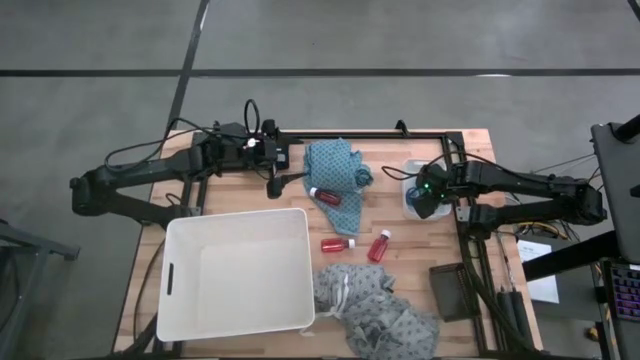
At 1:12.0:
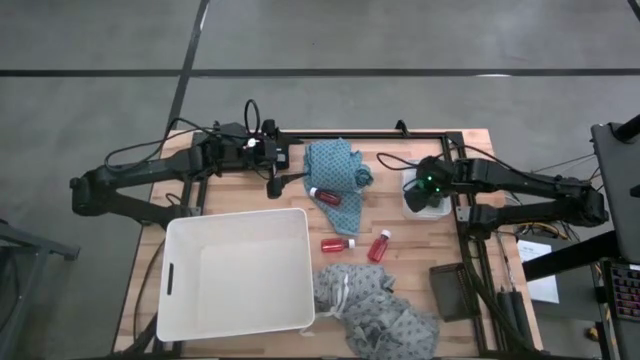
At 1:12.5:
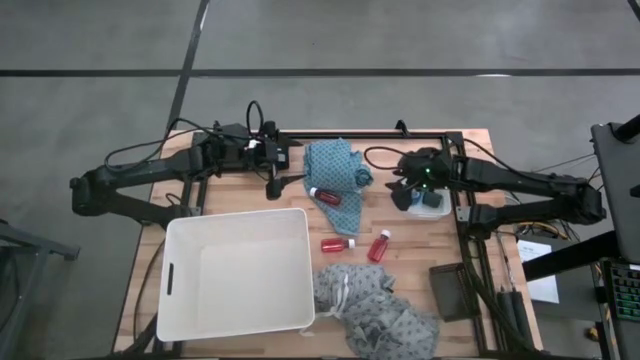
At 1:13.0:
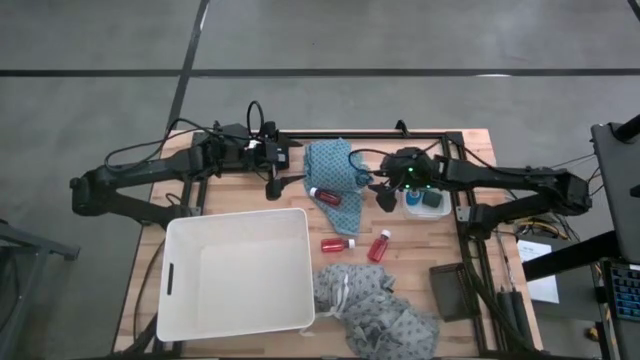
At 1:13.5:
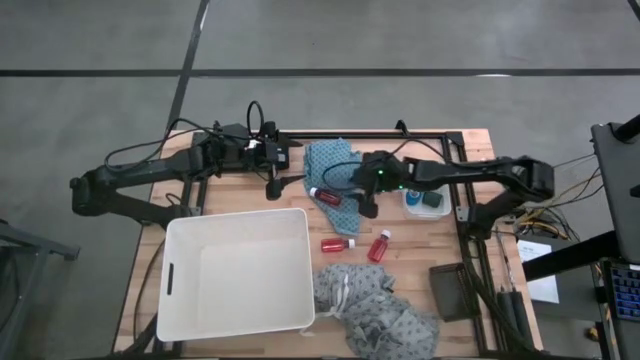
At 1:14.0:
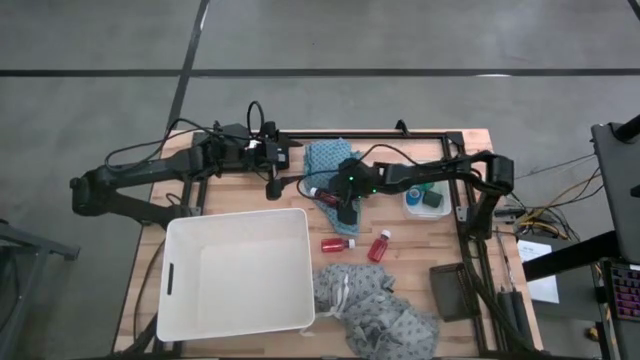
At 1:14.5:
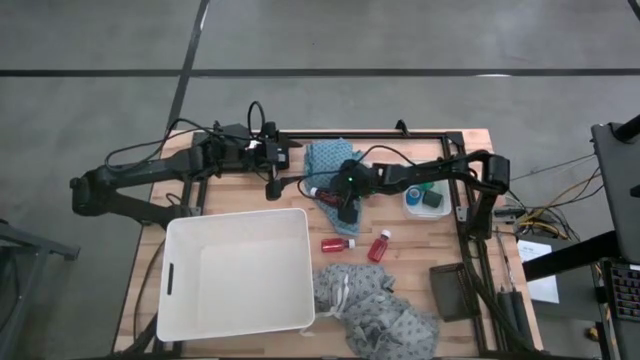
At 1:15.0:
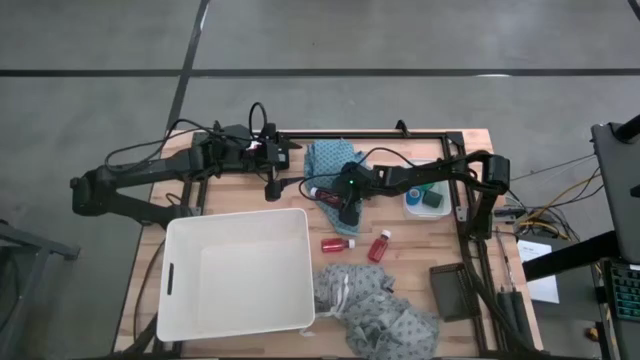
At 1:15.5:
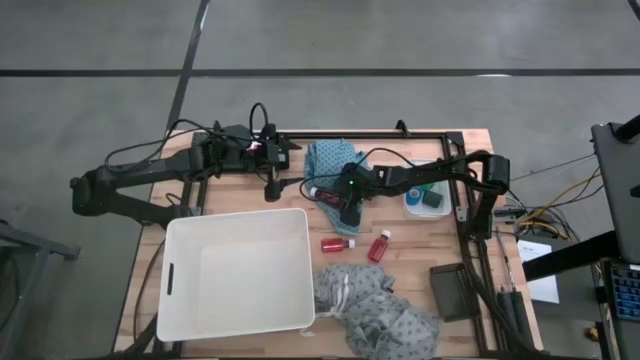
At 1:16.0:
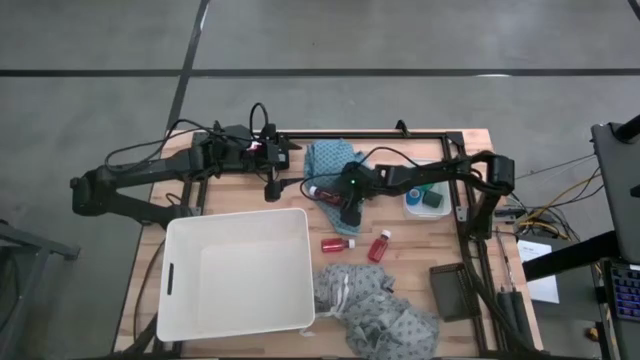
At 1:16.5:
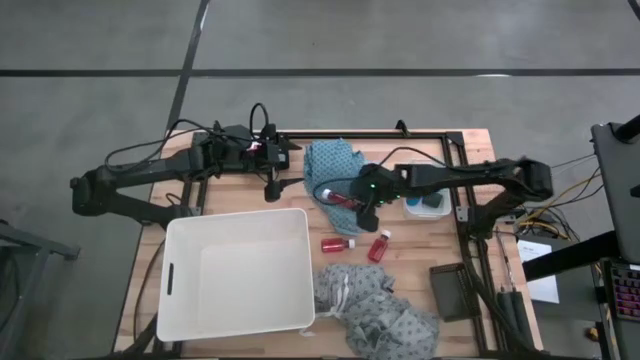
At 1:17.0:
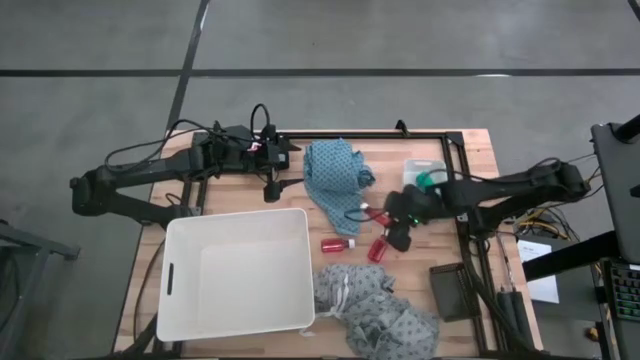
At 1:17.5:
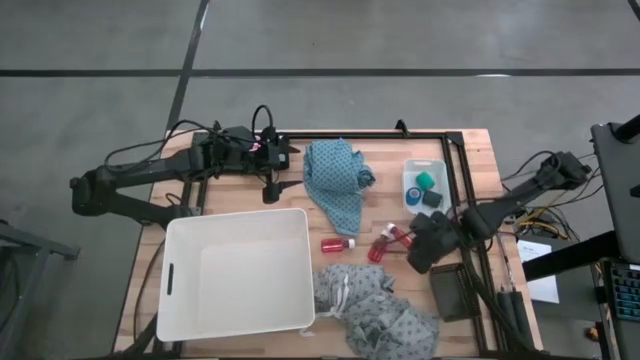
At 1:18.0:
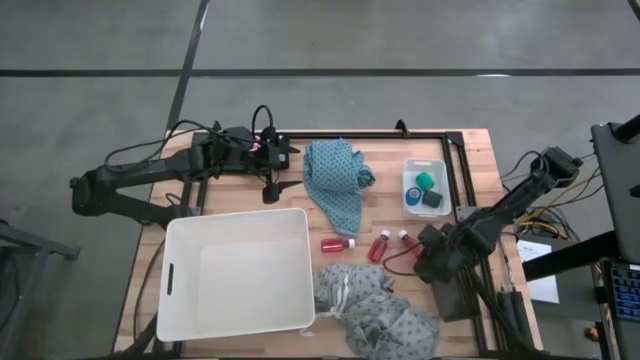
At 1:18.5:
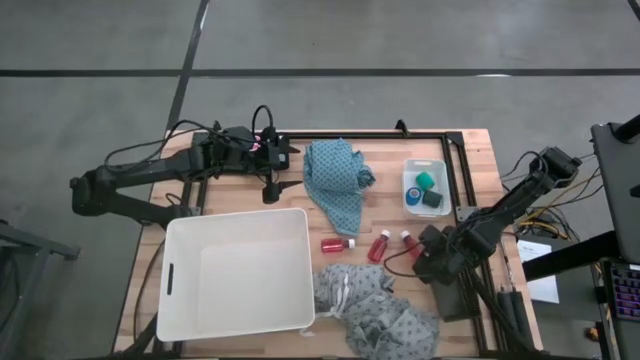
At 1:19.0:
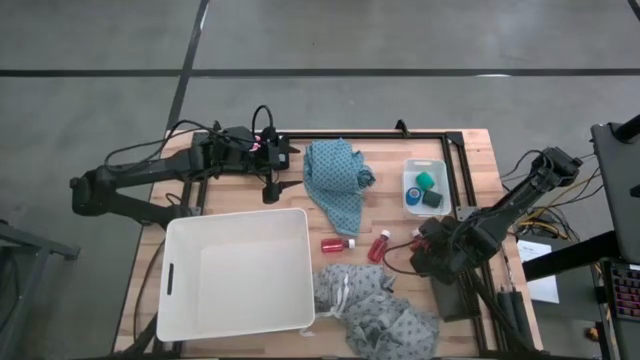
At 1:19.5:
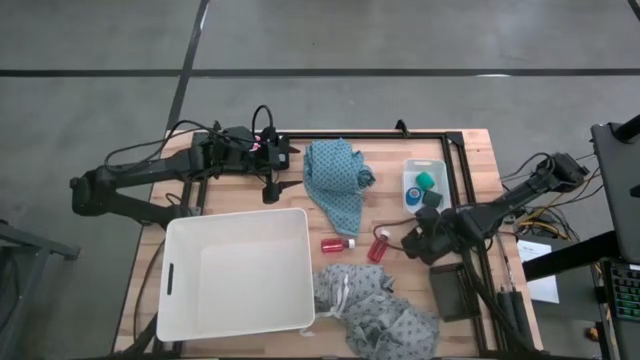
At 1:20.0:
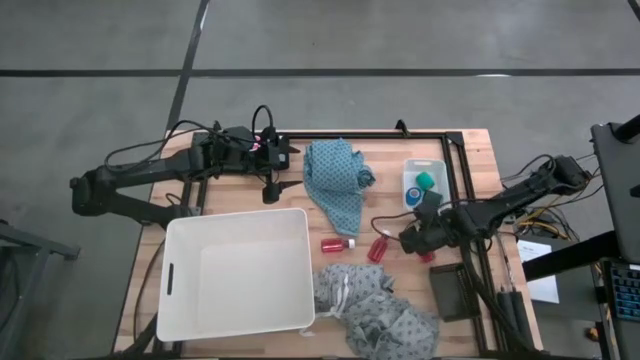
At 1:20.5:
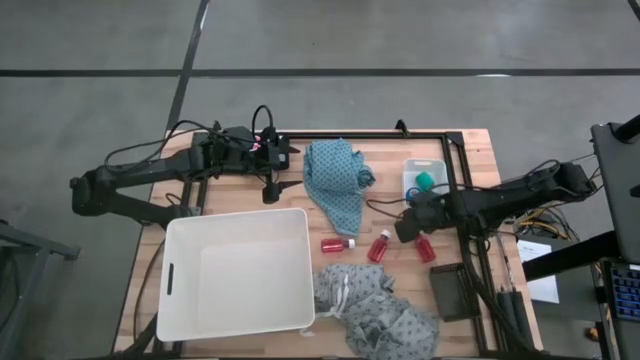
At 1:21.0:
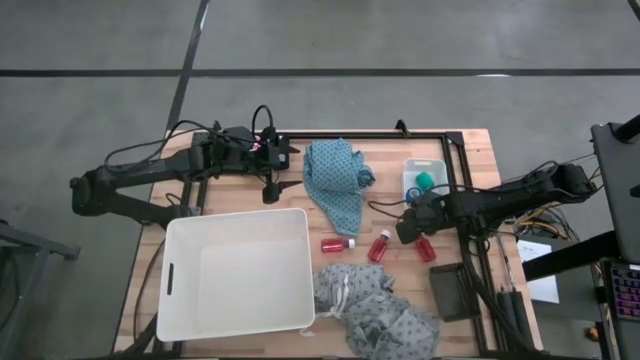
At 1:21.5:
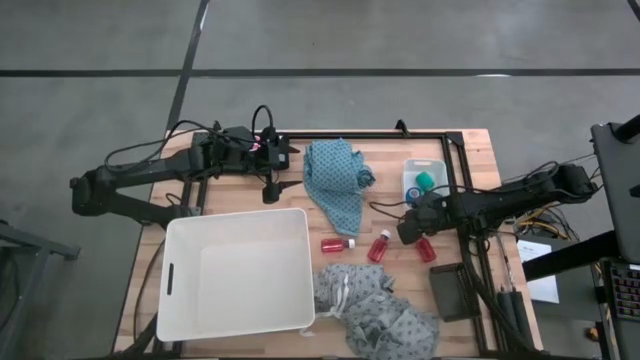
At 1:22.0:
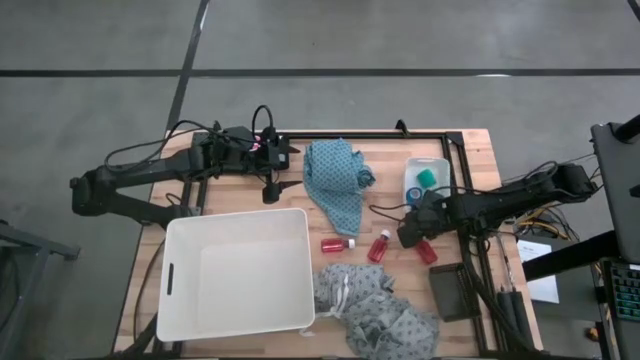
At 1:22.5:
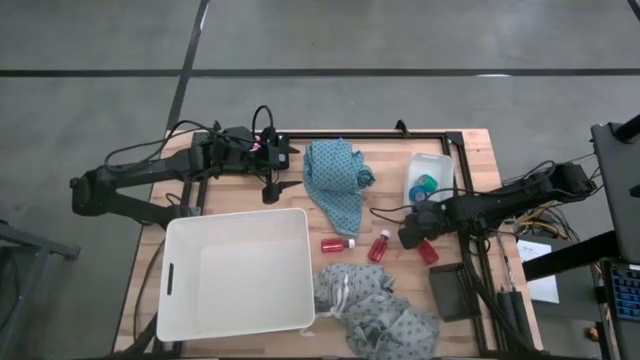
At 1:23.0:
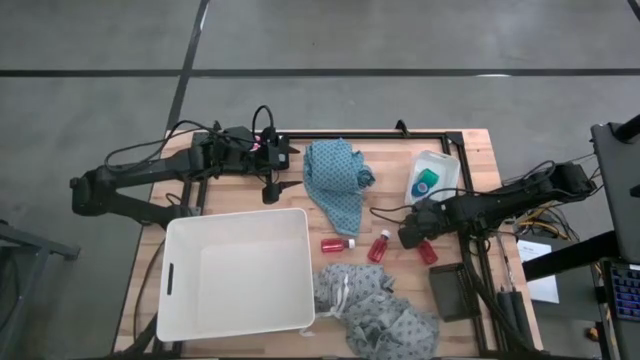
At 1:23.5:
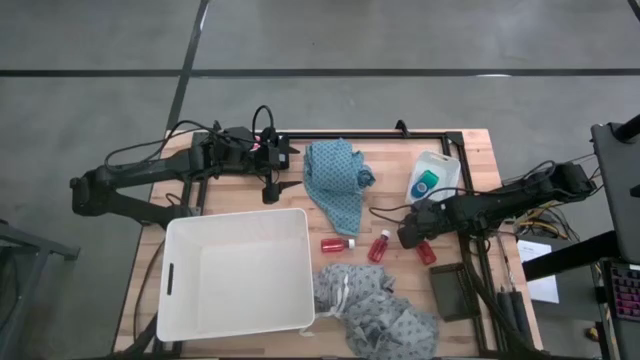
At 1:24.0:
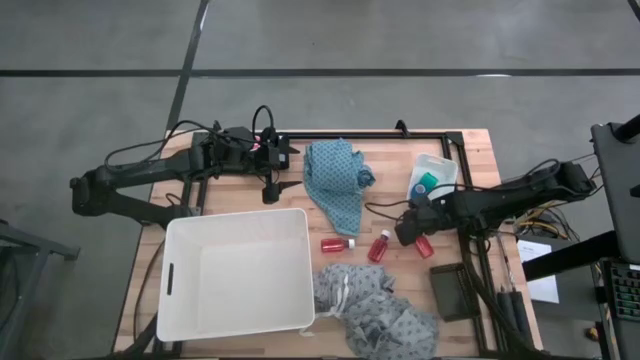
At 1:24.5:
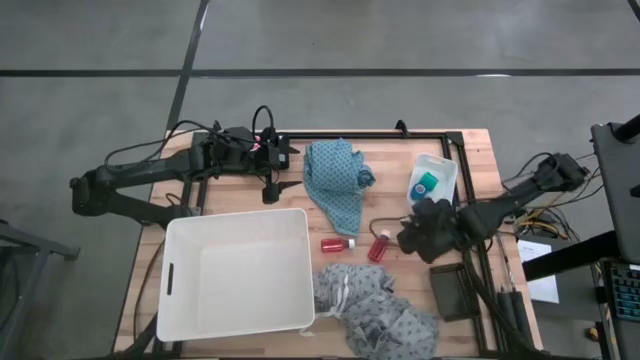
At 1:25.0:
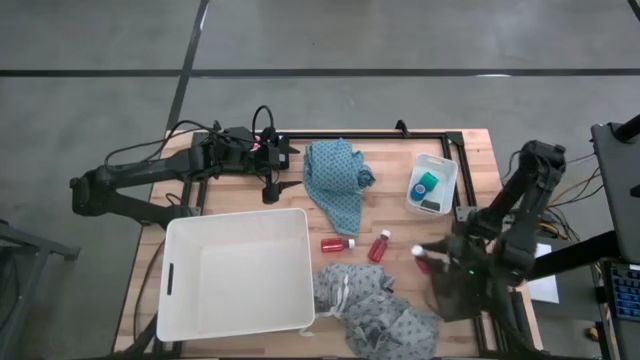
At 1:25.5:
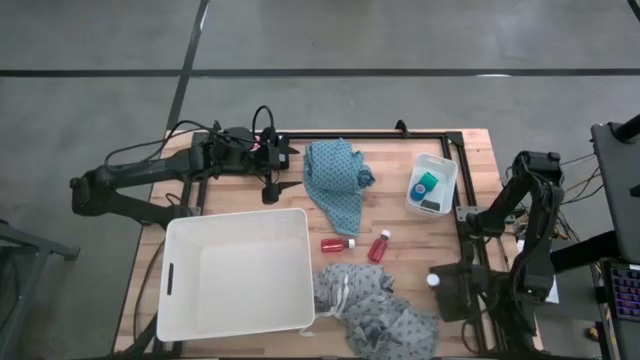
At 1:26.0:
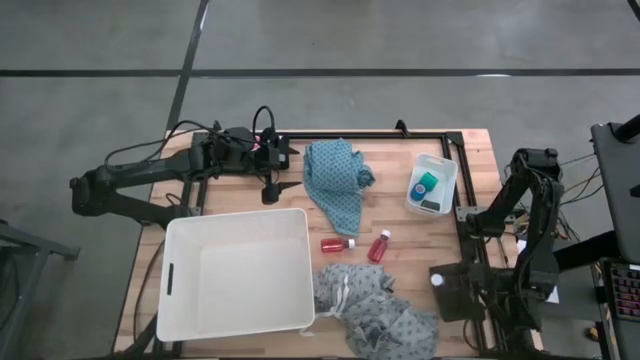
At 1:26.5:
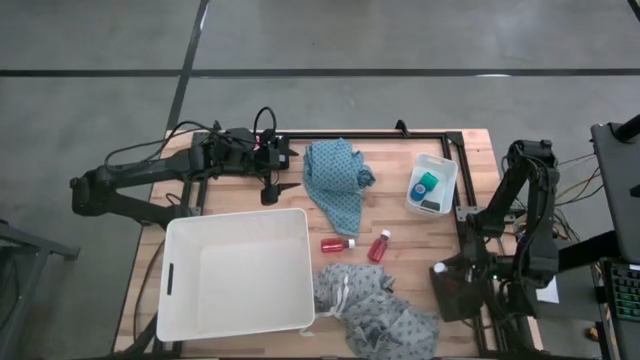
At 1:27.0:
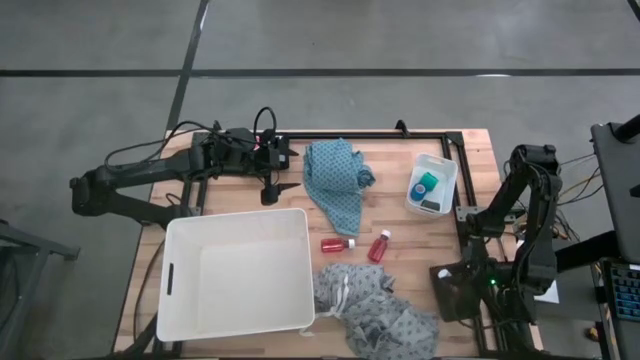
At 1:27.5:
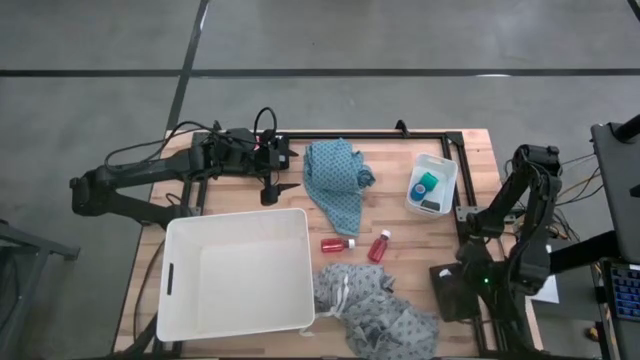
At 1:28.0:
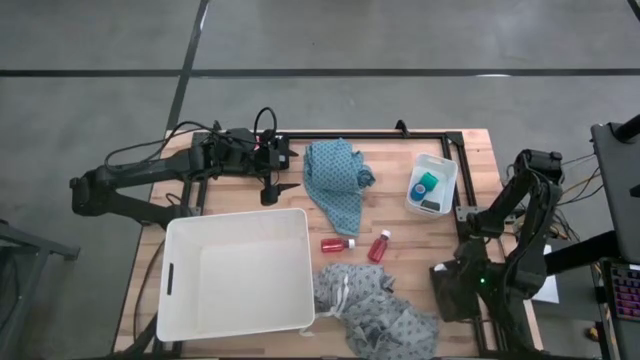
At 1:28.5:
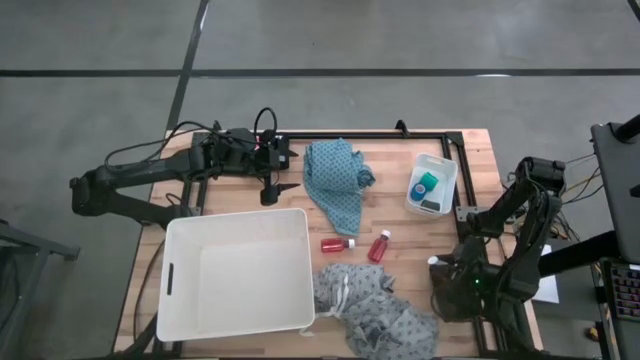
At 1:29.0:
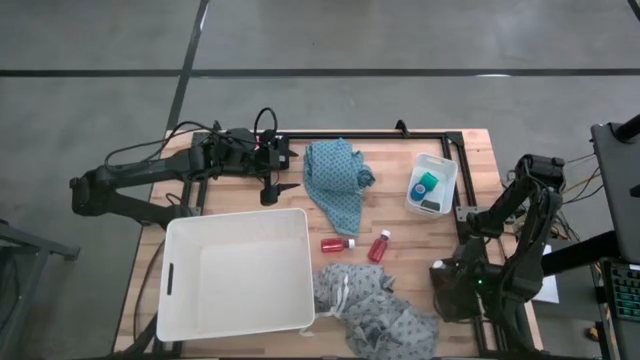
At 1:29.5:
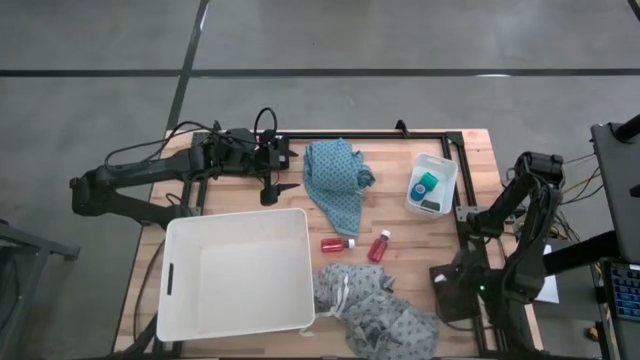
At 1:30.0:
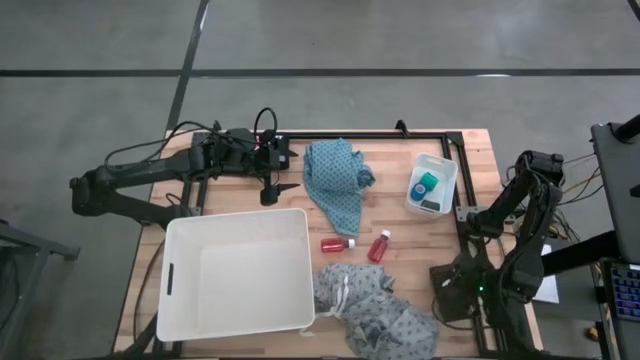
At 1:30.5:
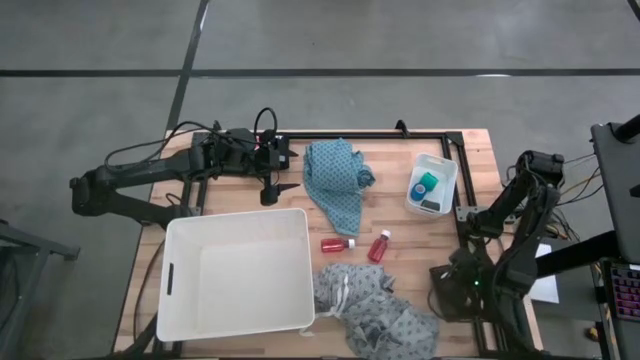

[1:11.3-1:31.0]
Task: Pick & Place Medicine items
Put the top red medicine bottle into the black bin
